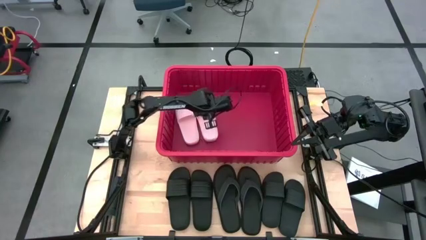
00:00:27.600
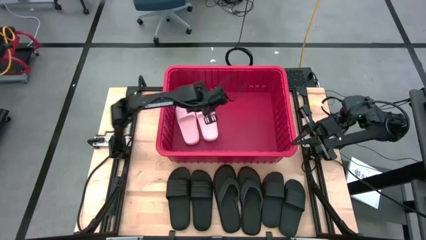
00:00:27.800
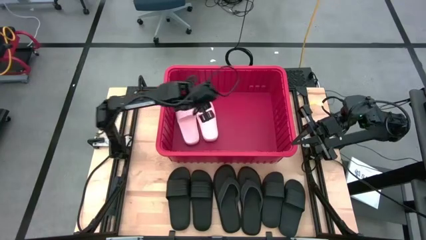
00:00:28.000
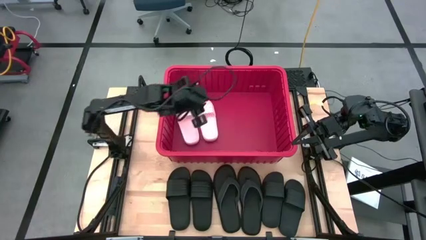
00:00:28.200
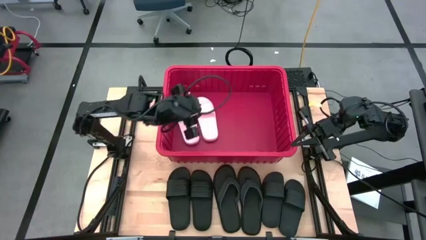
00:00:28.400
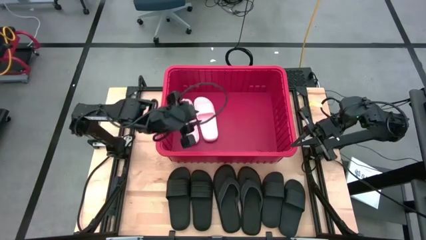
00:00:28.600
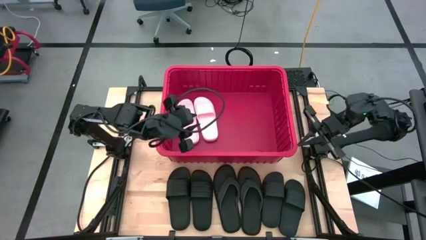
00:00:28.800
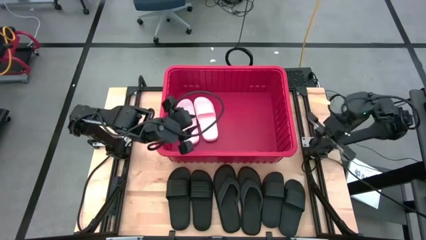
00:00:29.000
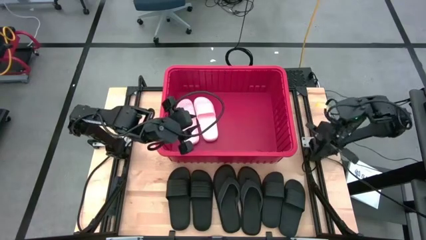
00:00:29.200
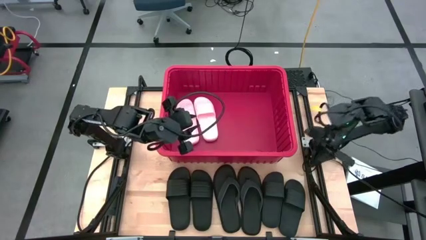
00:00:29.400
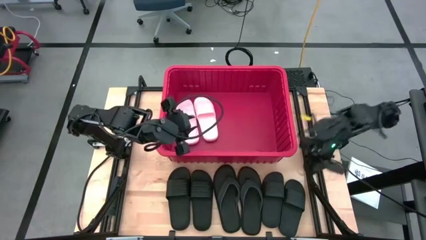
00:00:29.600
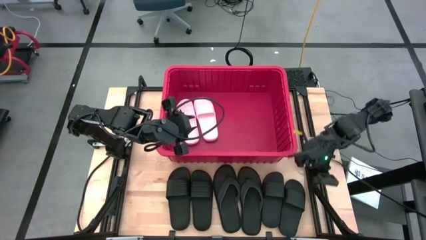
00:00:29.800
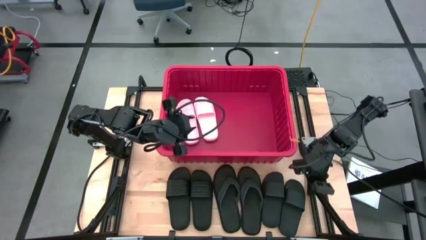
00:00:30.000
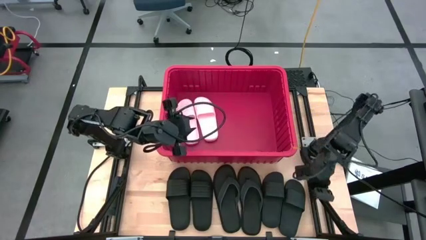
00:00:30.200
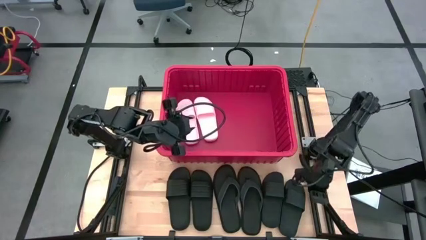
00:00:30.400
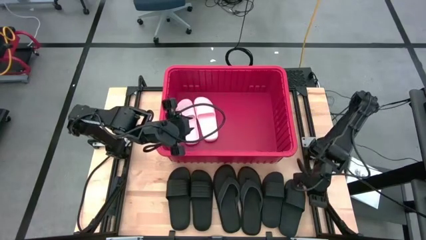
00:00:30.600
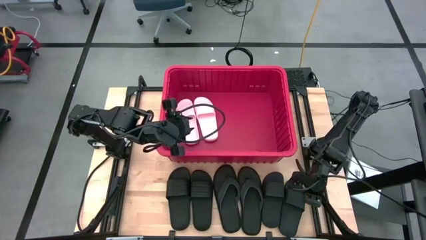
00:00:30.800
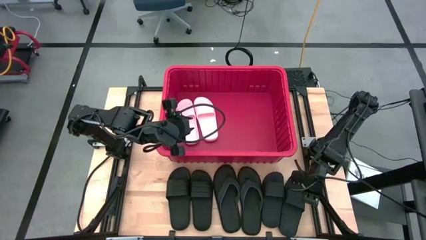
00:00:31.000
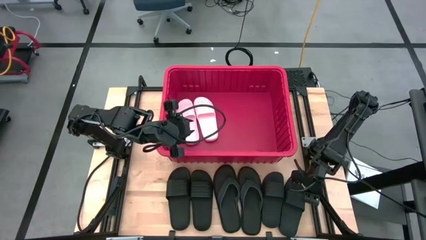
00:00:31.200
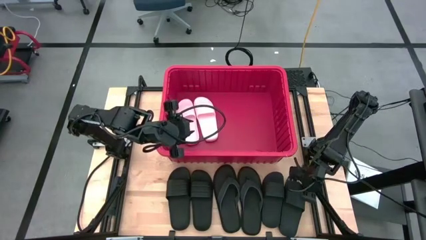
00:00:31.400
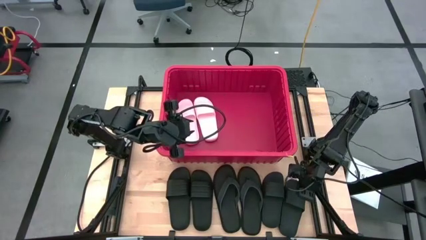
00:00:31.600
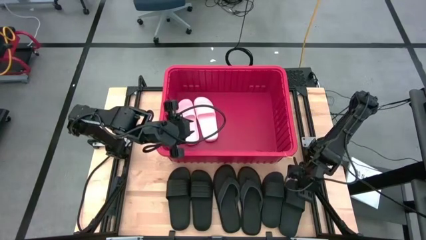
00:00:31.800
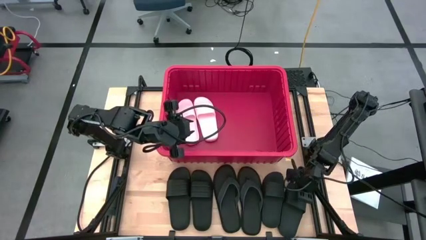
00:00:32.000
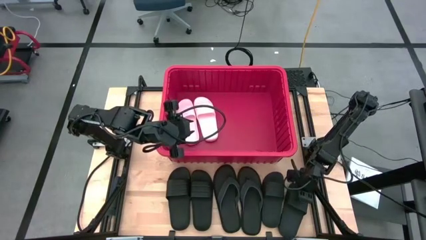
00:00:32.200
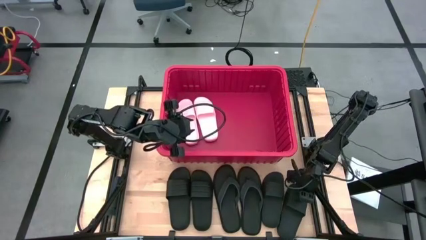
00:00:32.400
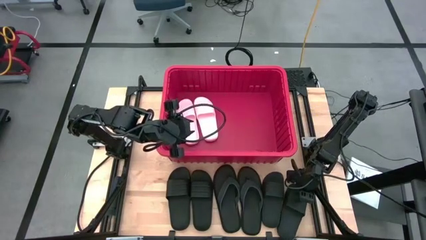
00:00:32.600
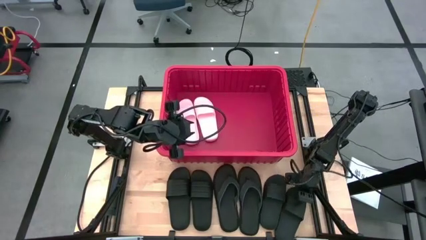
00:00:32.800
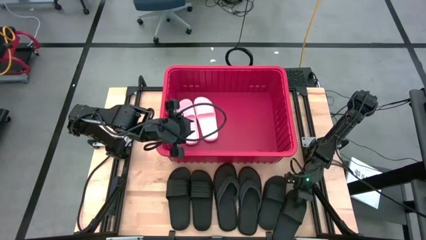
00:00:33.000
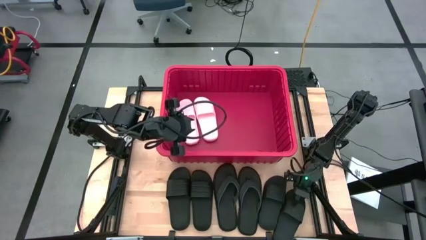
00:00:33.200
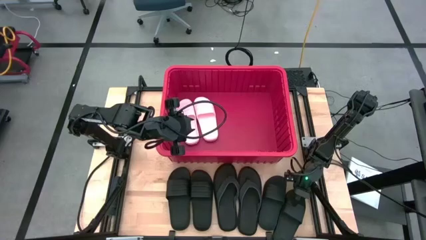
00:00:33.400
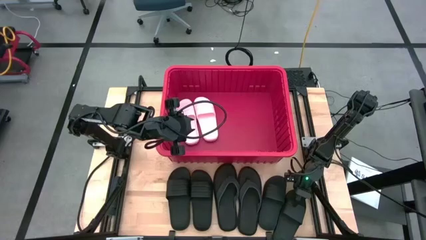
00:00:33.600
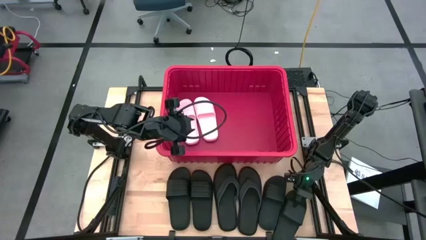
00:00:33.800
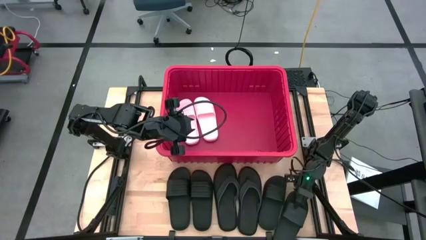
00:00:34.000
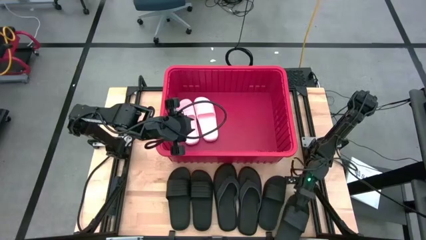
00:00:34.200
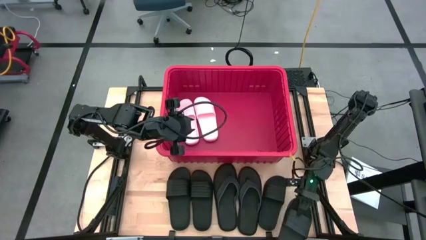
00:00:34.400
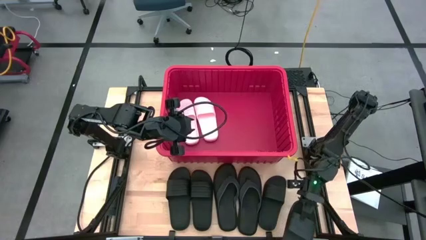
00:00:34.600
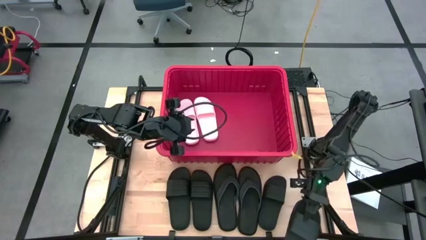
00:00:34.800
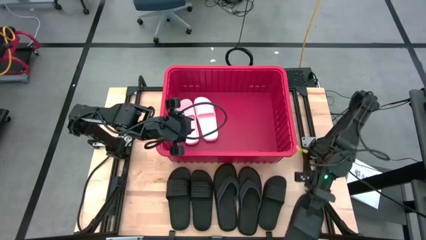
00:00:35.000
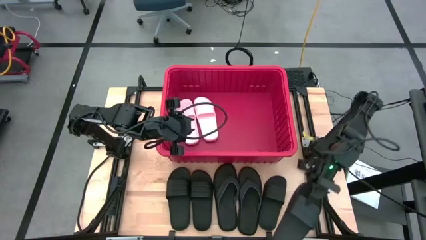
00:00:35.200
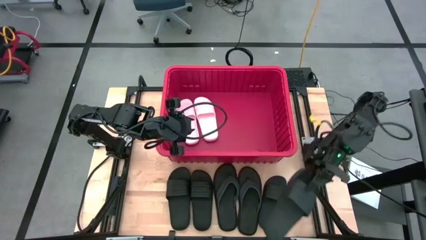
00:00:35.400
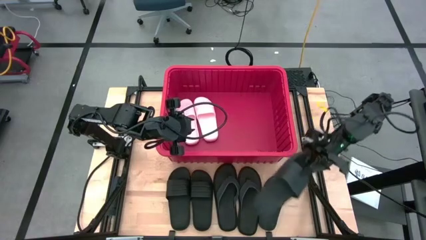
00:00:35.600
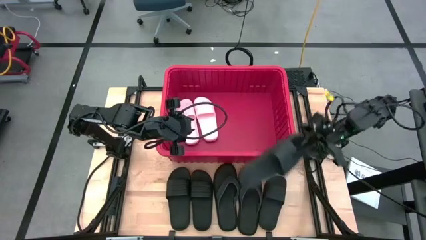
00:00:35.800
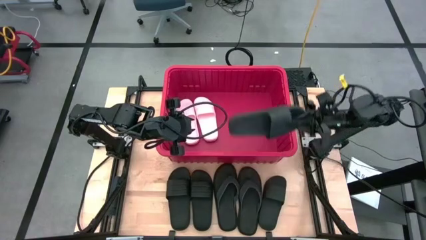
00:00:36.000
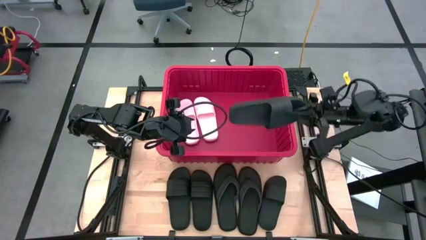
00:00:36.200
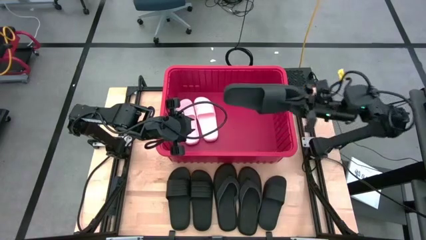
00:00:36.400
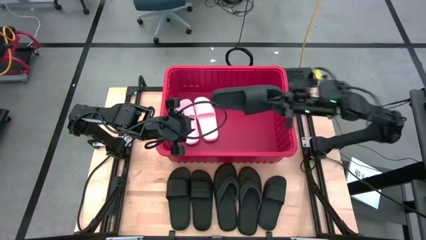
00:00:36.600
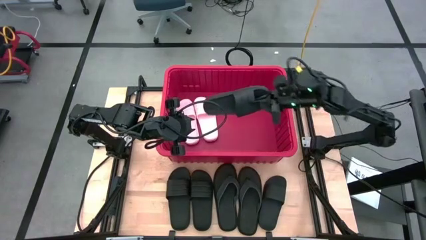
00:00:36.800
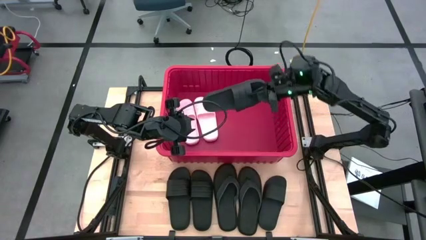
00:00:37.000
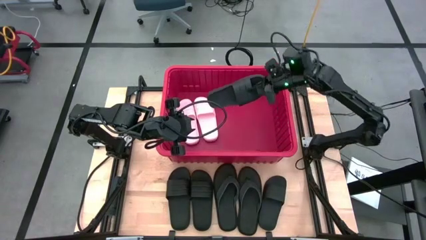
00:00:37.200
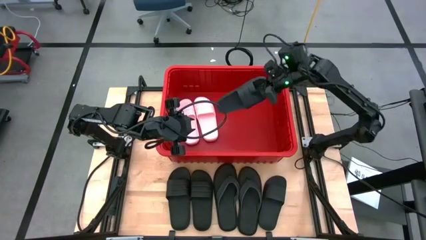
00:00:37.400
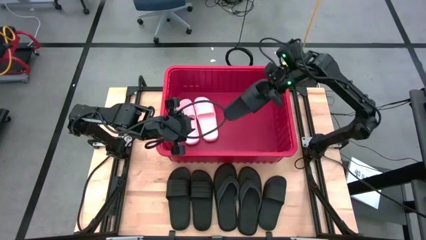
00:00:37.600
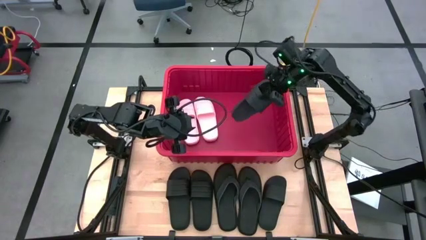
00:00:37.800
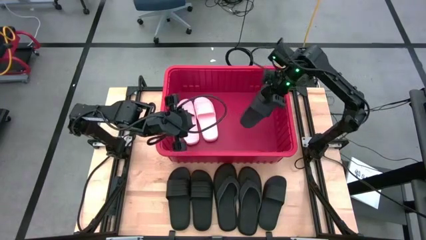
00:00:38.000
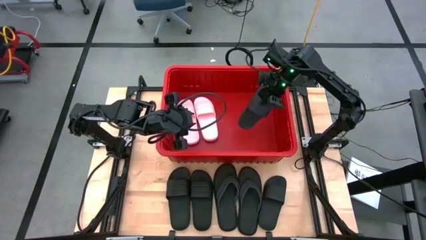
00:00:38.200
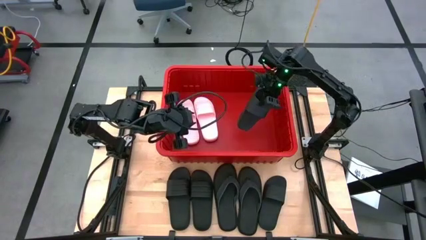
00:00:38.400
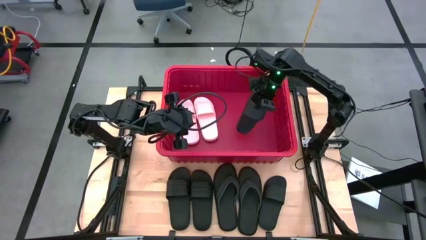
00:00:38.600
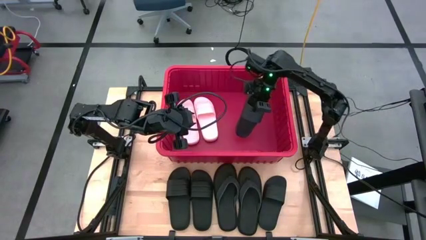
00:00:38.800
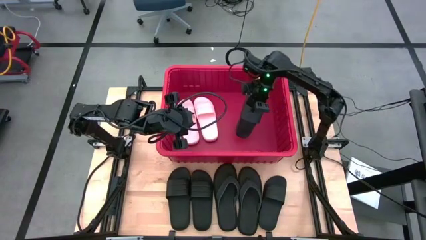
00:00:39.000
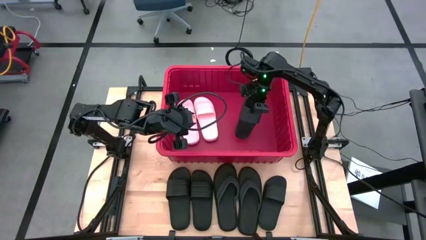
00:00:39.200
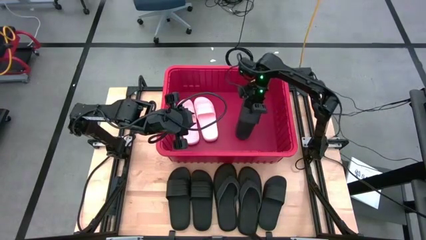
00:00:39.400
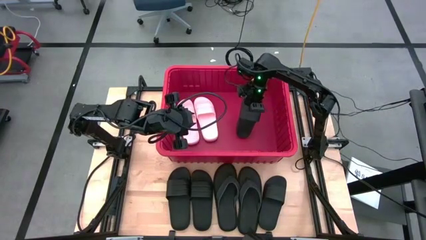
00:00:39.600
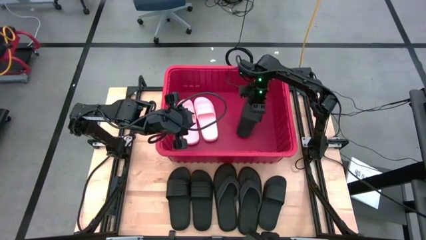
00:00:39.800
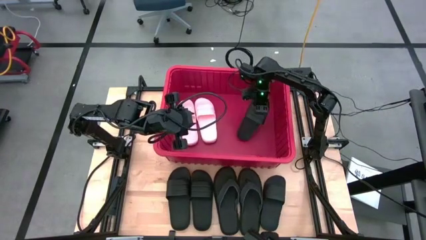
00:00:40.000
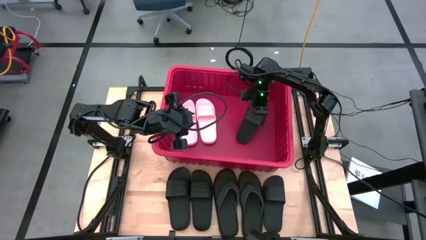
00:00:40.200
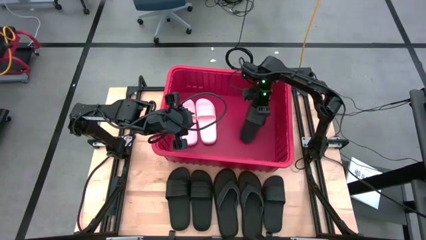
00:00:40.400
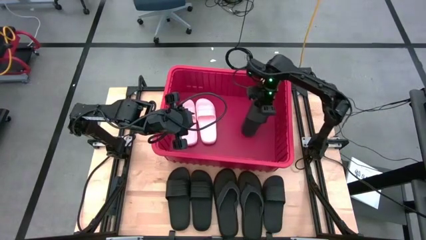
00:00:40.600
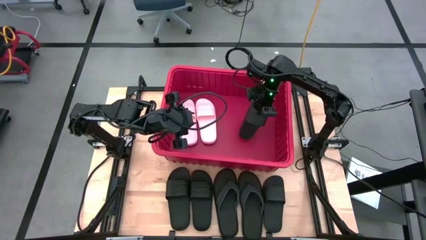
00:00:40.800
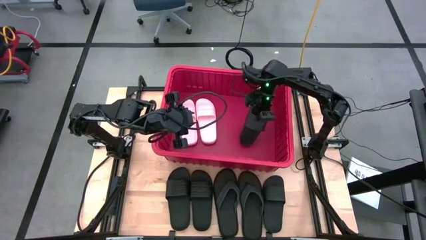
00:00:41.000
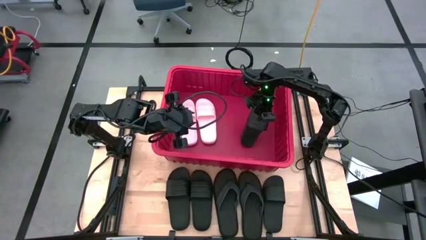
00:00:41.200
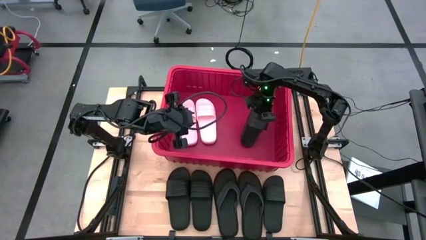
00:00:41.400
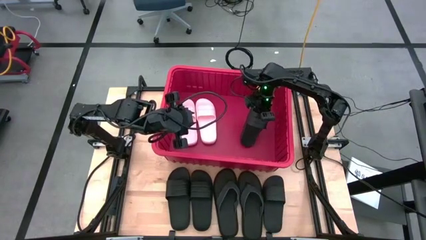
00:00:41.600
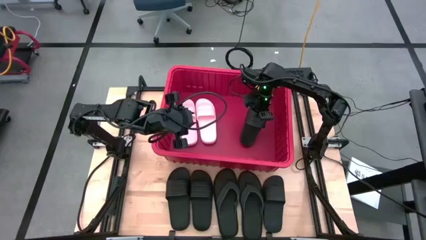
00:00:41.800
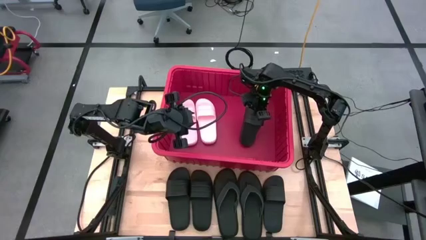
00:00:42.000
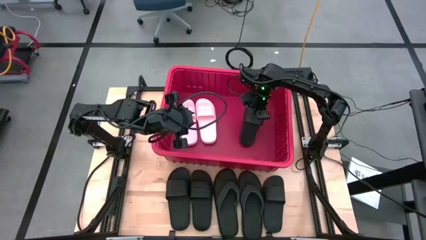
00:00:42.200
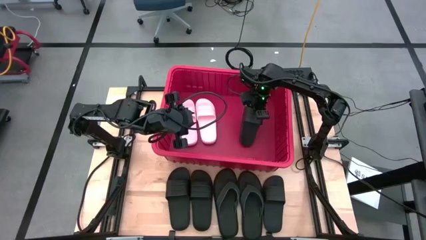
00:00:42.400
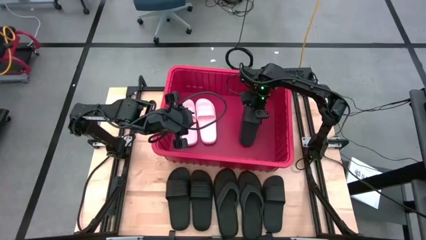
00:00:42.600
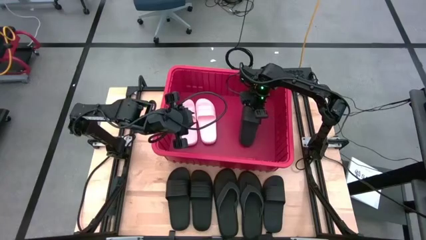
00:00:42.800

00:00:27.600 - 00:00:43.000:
Task: Pick and place slides into bin
Put the black slide into the bin

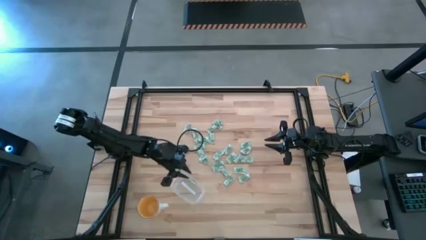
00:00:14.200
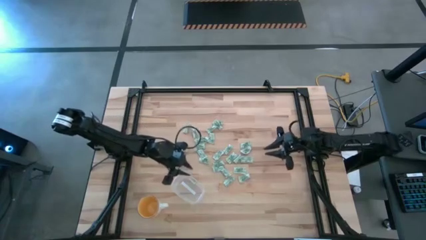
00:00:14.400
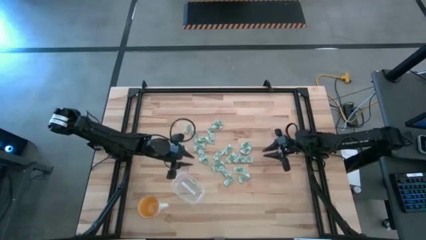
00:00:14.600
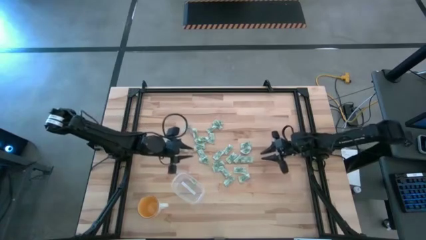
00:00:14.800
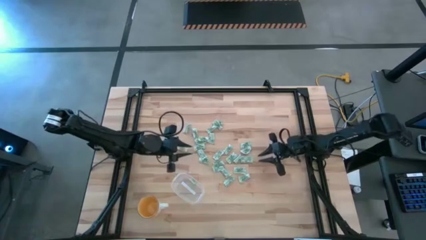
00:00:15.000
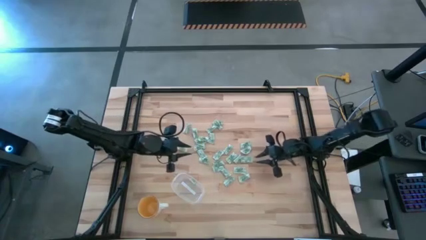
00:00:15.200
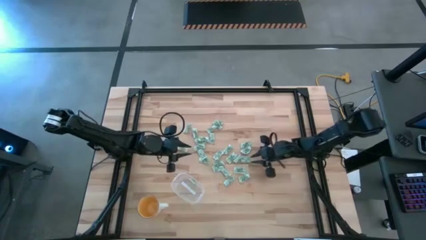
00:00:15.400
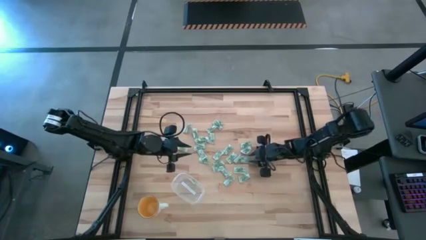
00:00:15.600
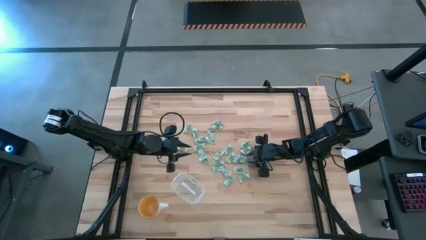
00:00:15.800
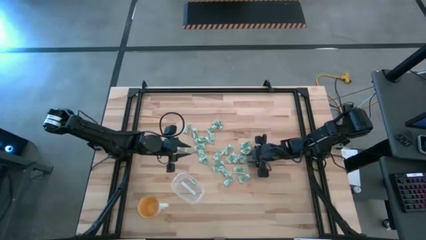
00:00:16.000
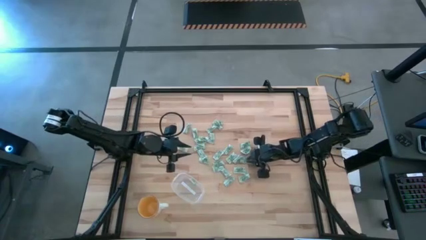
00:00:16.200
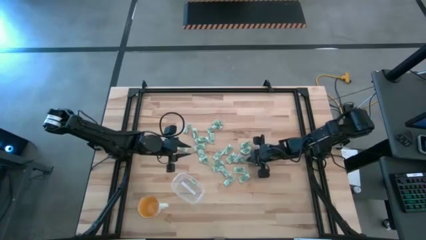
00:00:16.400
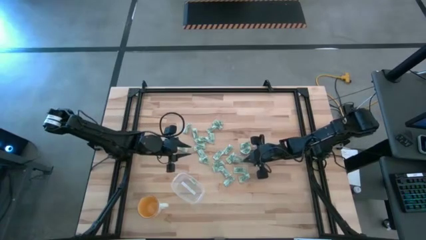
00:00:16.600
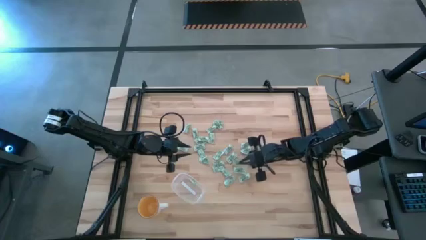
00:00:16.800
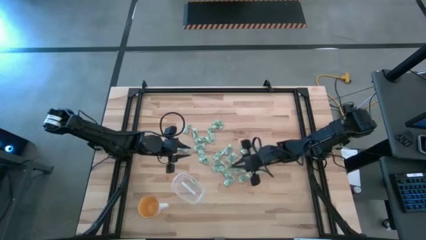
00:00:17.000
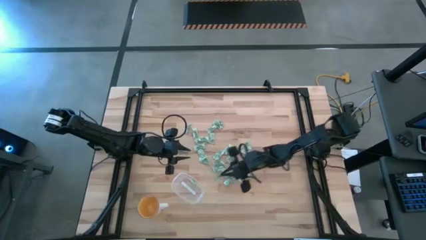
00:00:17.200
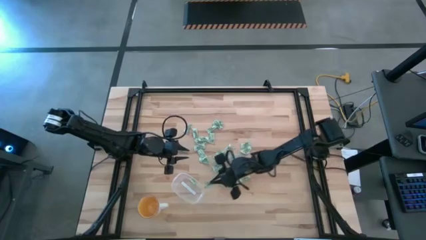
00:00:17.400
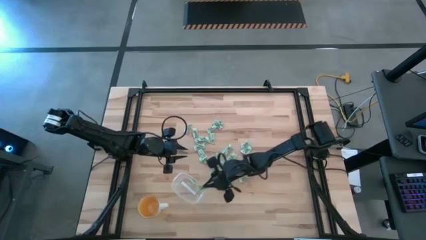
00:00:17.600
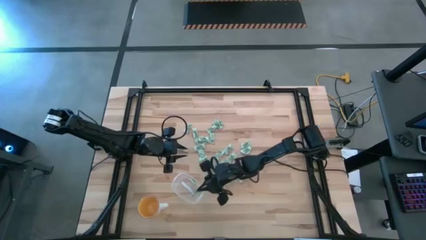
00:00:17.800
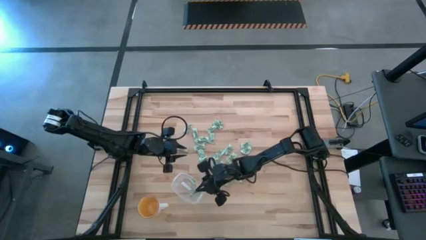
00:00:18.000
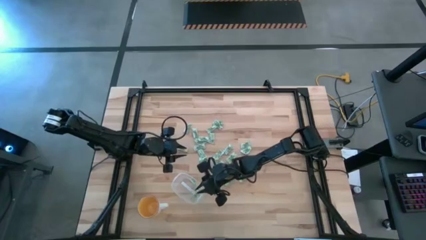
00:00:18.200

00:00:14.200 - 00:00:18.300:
Task: Pick and place Stevia / Truvia into bins
Put the stevia packet into the transparent container
